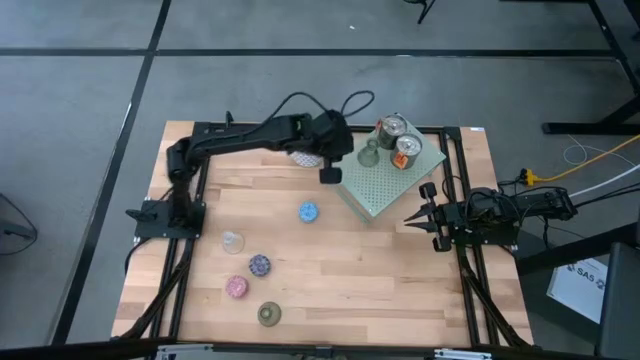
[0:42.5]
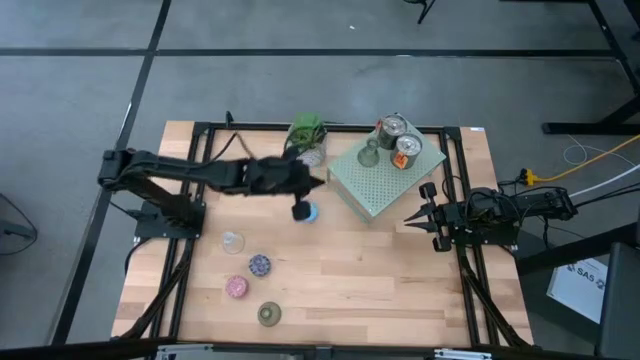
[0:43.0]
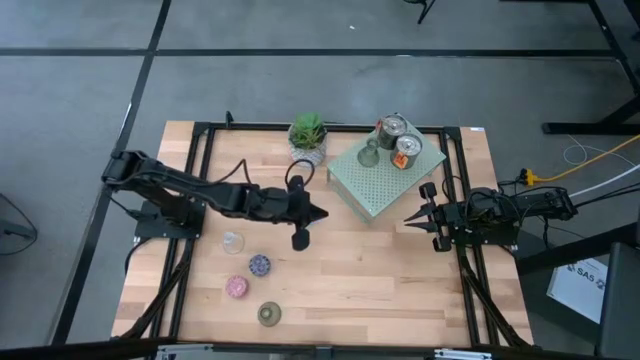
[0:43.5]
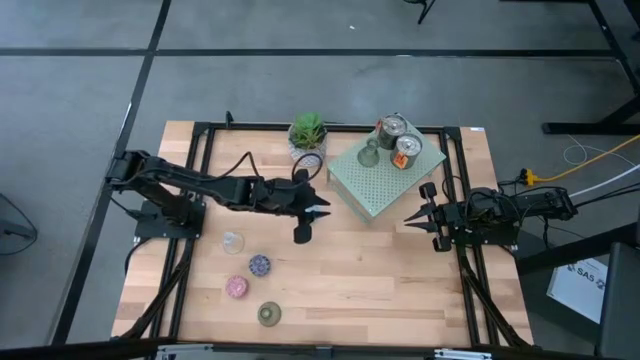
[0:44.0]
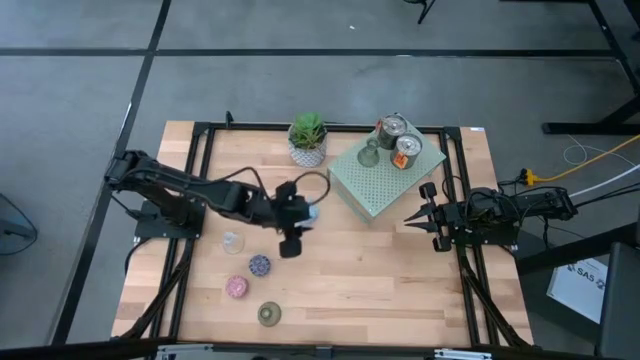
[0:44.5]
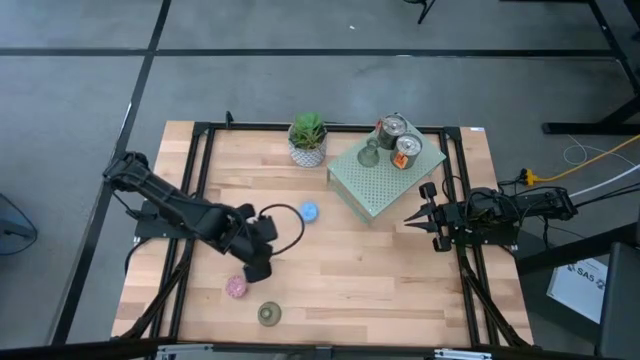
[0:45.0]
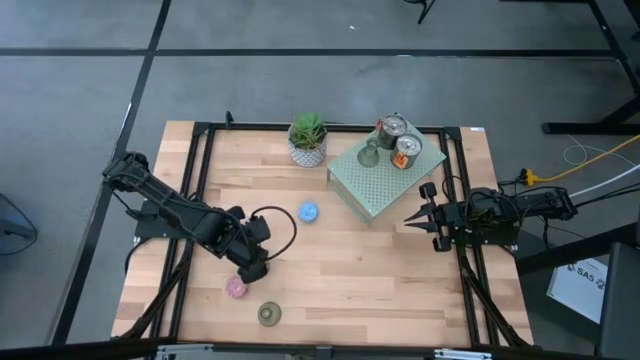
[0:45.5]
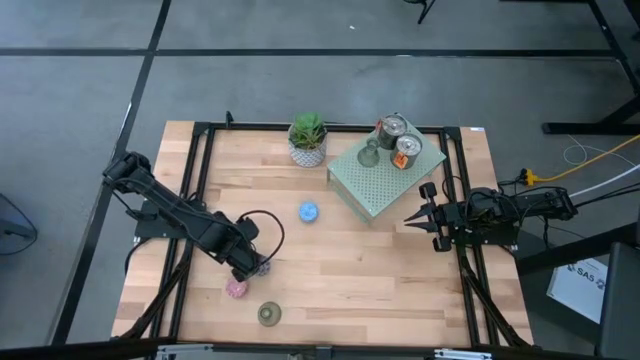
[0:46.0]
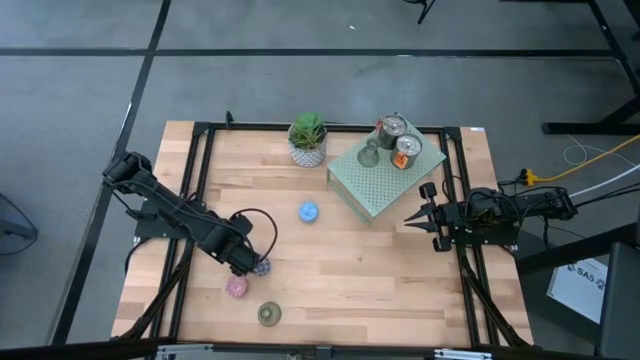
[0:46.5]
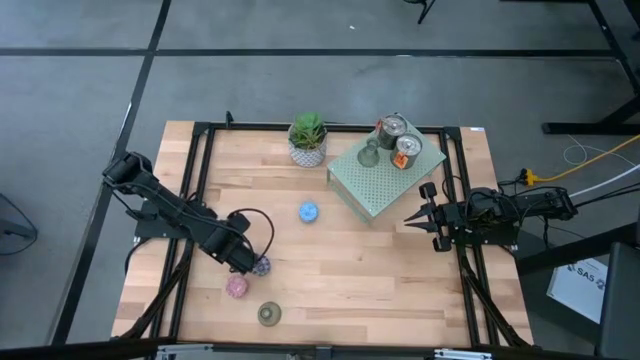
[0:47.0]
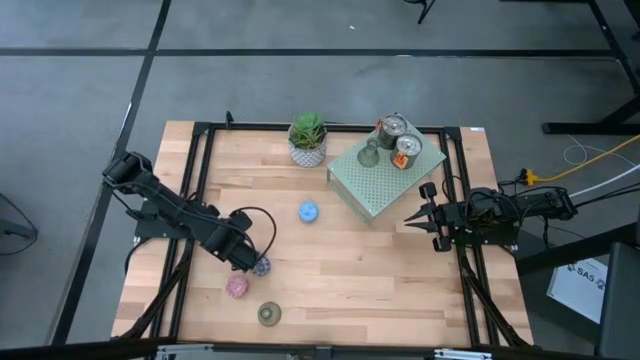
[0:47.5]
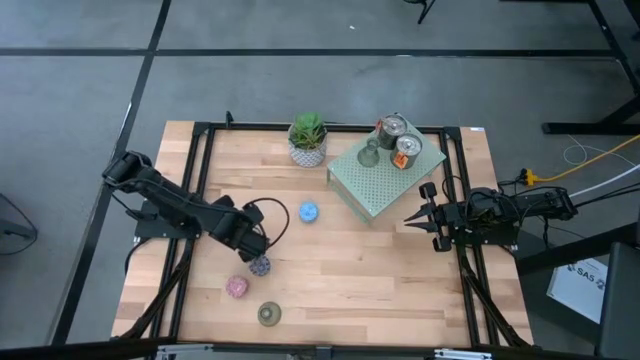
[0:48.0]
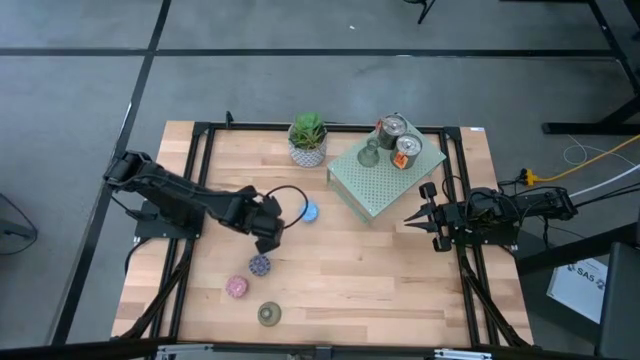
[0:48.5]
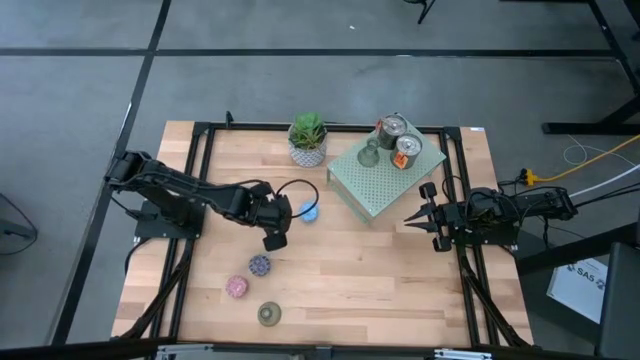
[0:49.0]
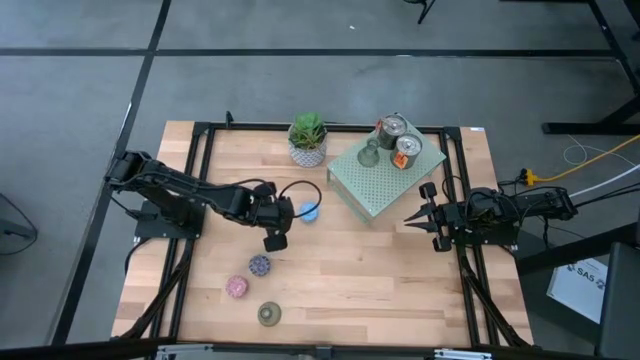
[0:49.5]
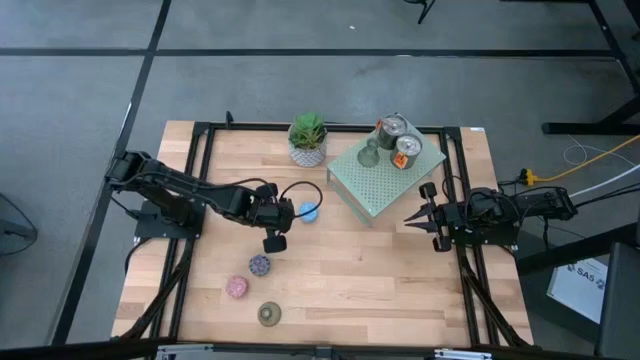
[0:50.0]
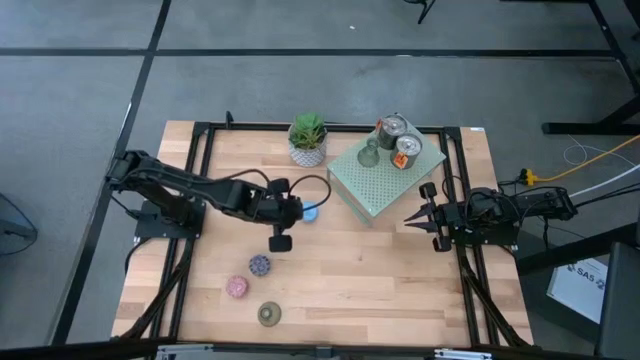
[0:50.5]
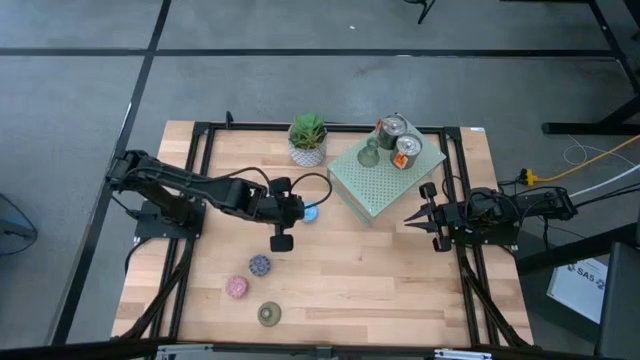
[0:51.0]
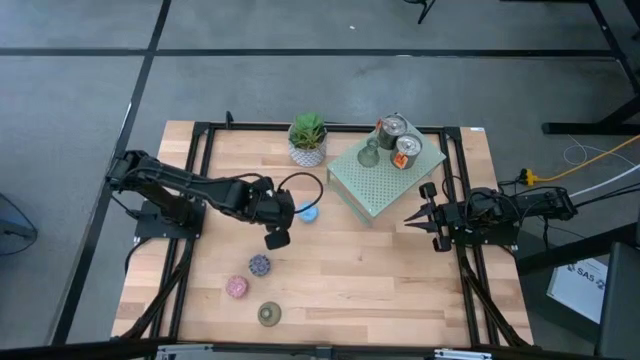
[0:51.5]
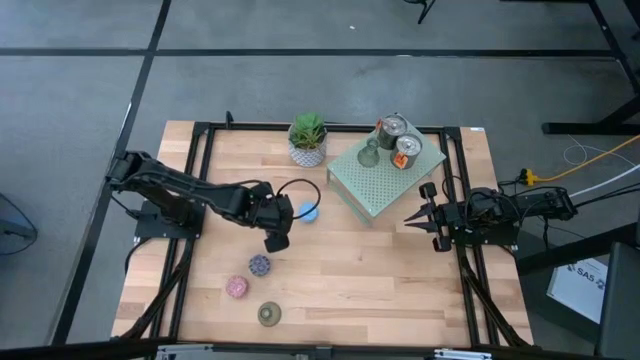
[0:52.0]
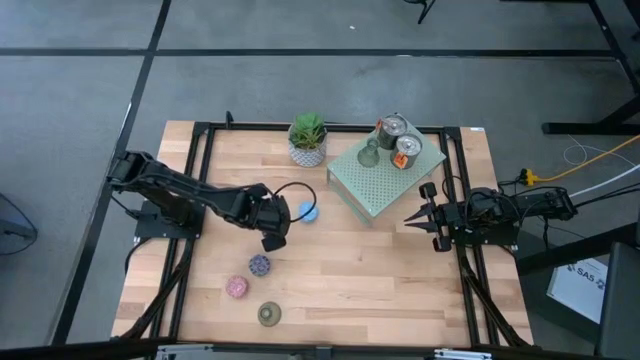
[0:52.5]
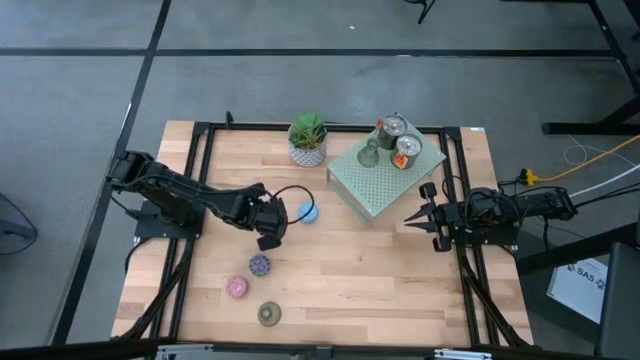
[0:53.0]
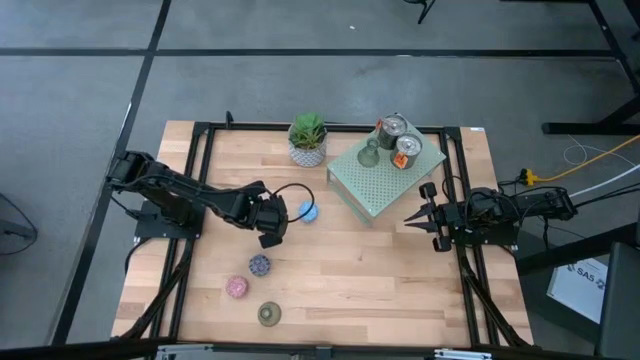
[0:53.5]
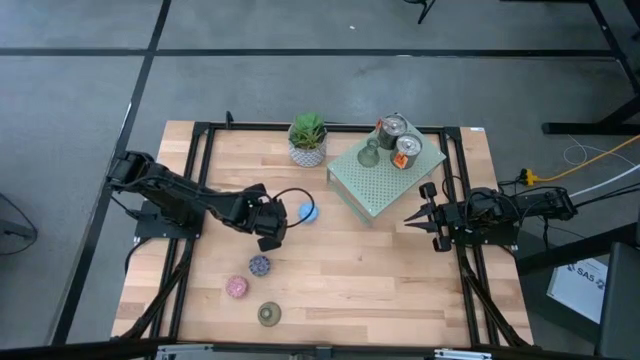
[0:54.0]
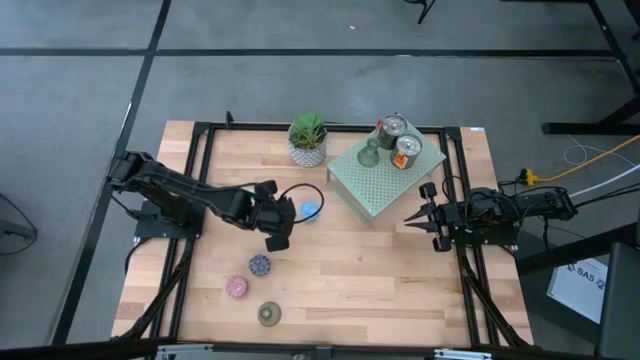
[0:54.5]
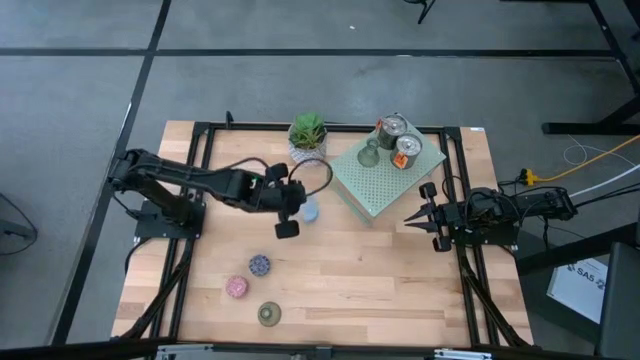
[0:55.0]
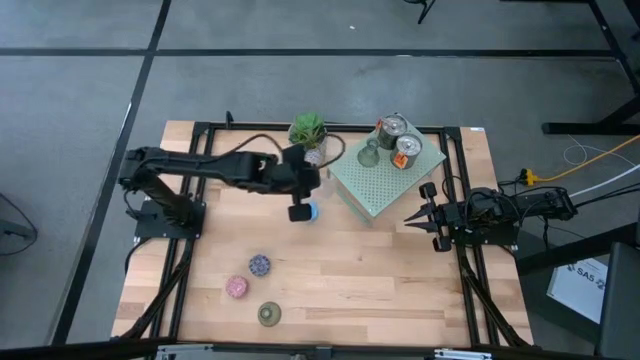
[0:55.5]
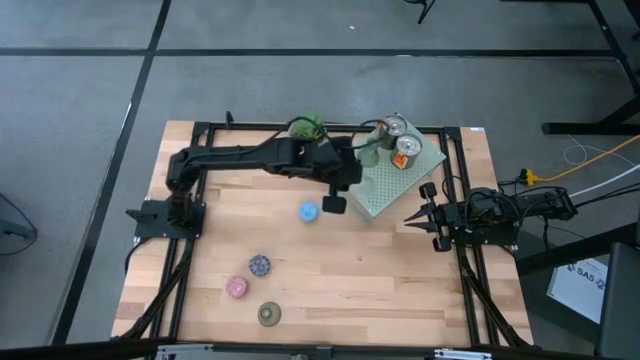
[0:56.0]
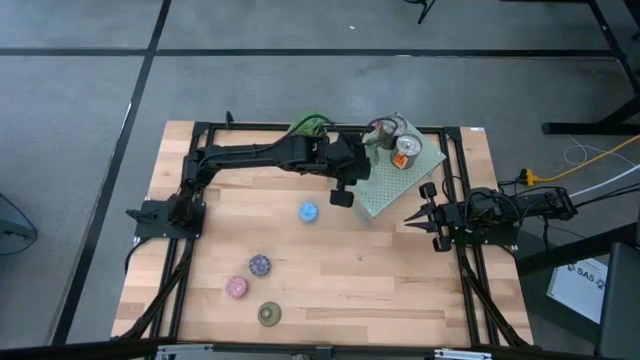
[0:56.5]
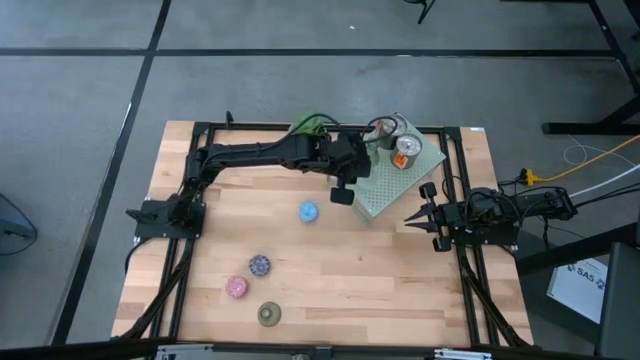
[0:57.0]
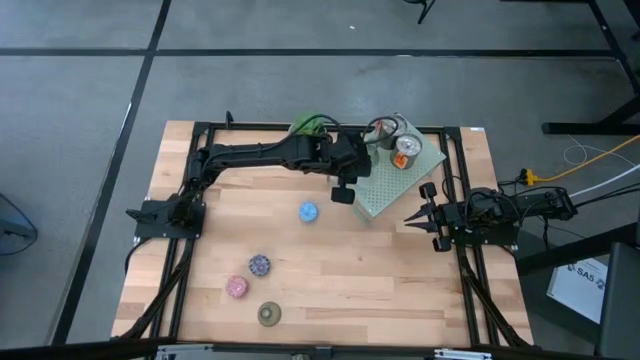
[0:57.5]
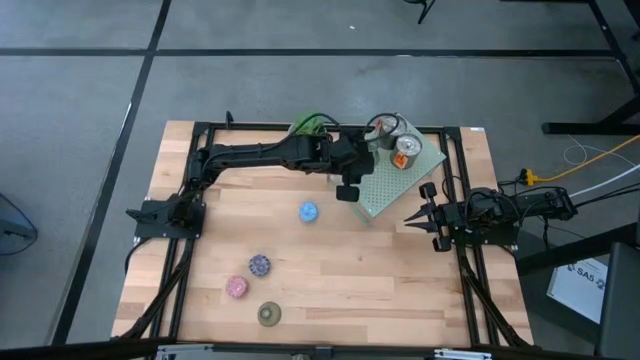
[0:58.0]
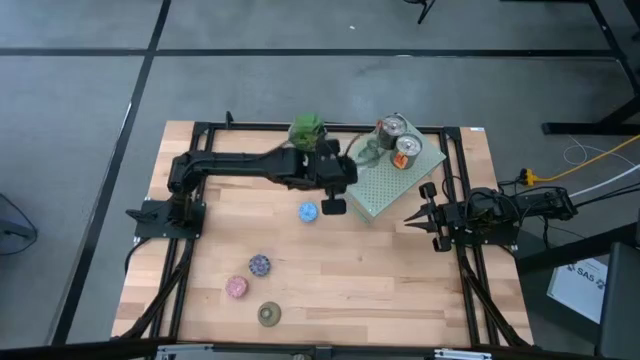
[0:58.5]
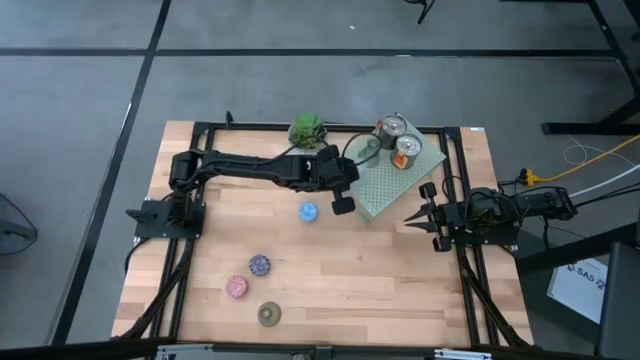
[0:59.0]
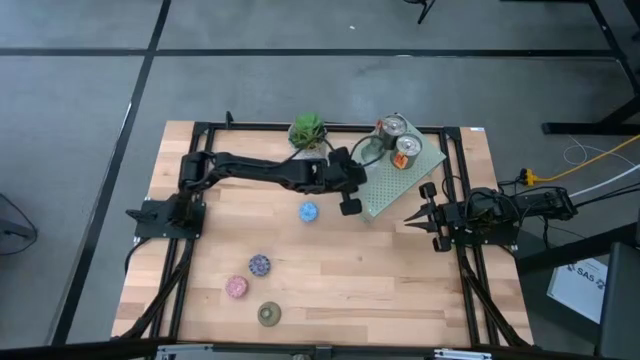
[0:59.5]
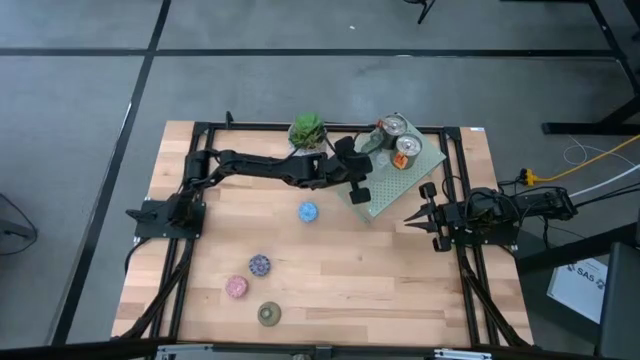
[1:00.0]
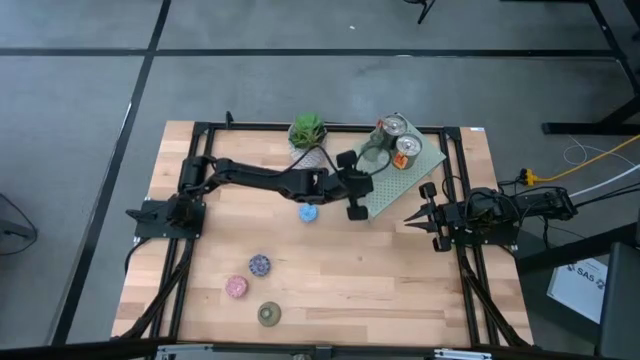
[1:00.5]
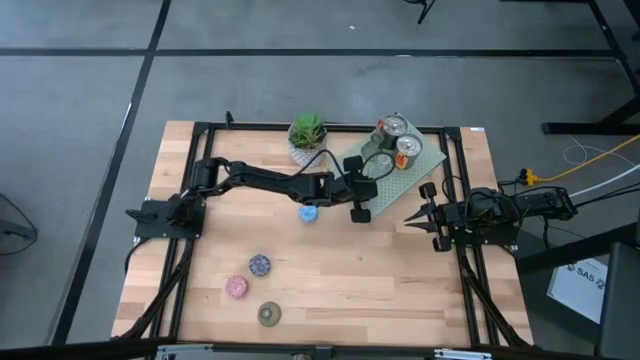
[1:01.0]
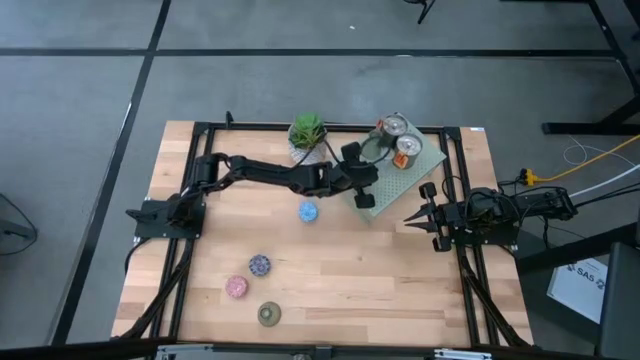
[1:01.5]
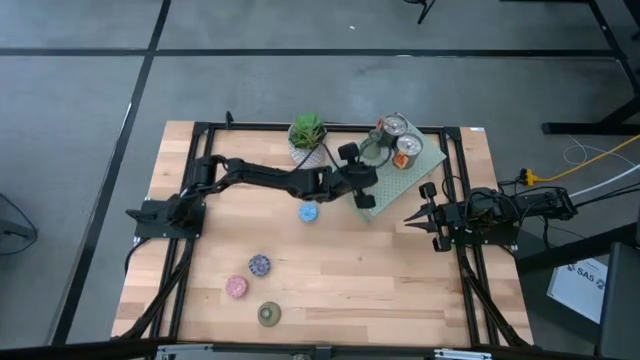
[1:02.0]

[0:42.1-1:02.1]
Task: Pick & Place candle stick holders
Align the transparent glass candle holder with the other green glass candle holder on the shelf
